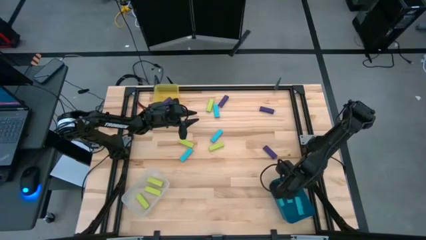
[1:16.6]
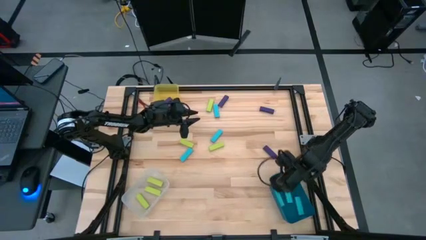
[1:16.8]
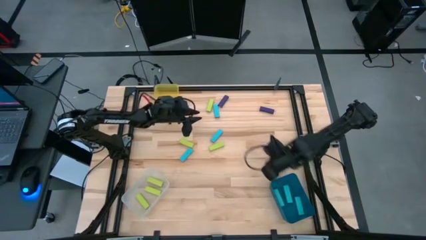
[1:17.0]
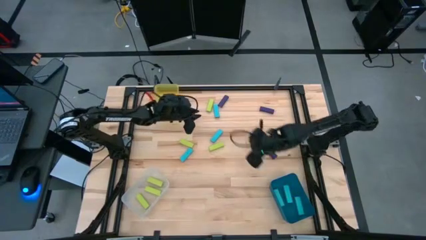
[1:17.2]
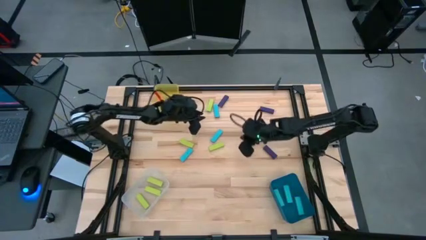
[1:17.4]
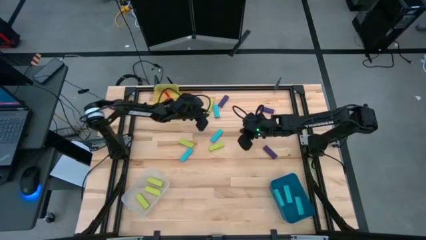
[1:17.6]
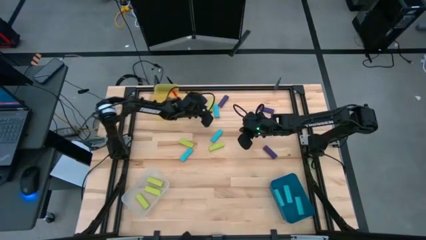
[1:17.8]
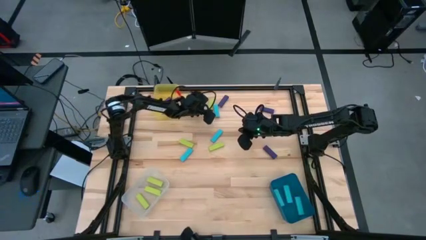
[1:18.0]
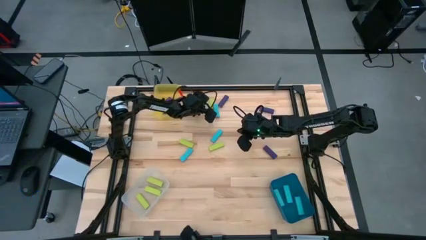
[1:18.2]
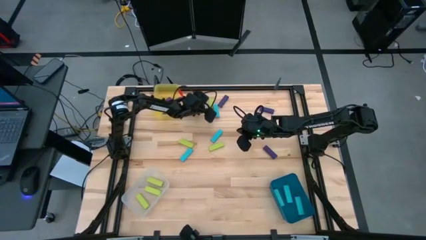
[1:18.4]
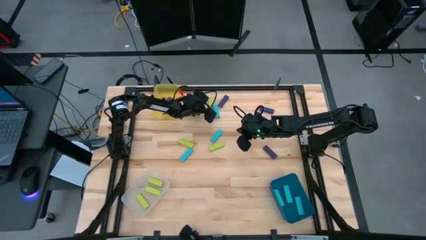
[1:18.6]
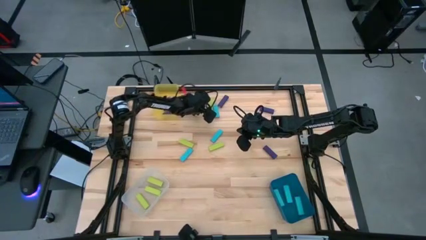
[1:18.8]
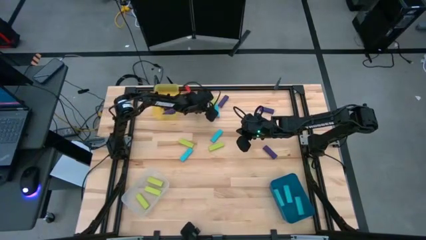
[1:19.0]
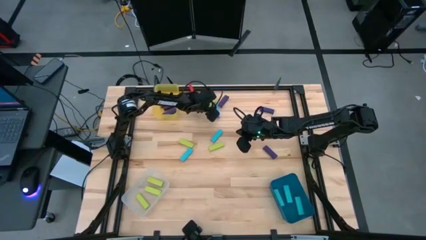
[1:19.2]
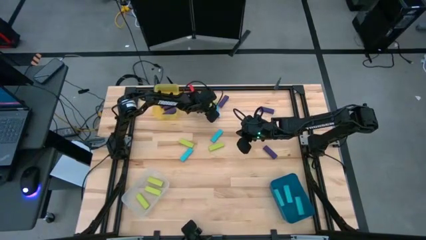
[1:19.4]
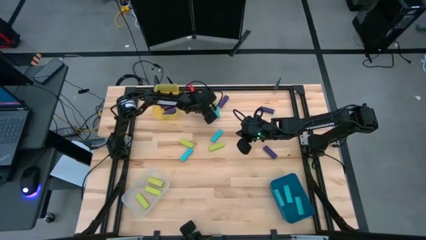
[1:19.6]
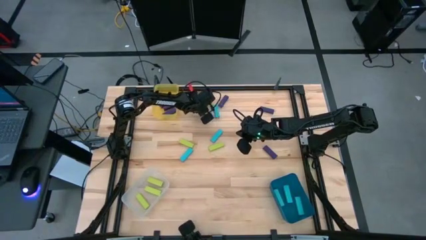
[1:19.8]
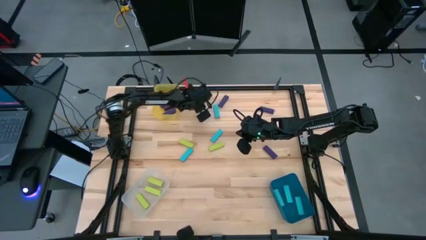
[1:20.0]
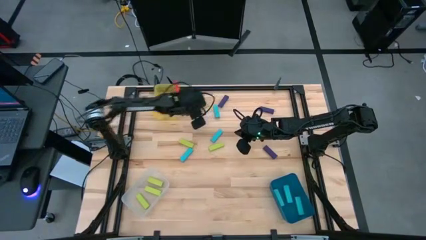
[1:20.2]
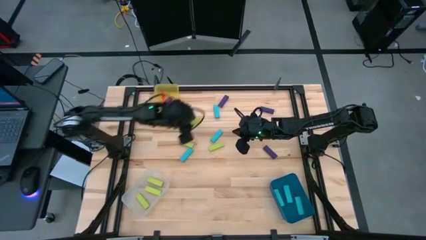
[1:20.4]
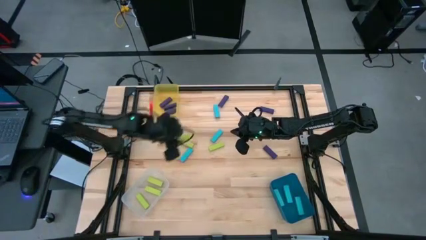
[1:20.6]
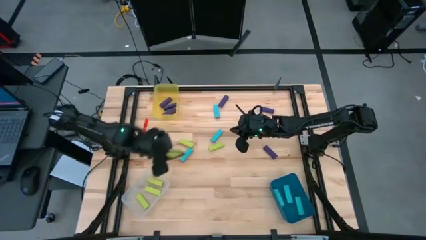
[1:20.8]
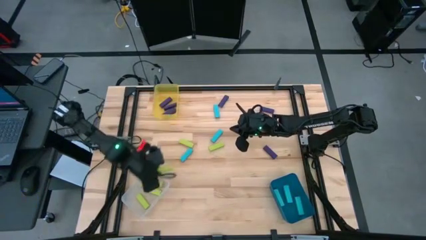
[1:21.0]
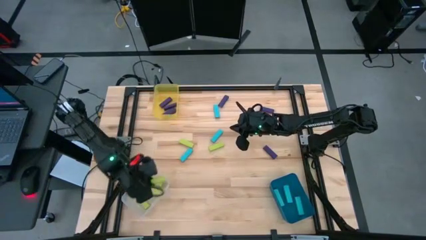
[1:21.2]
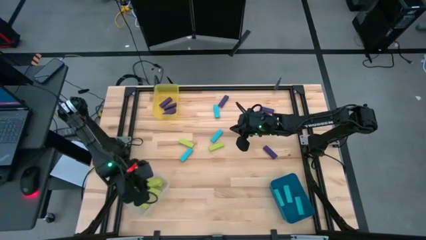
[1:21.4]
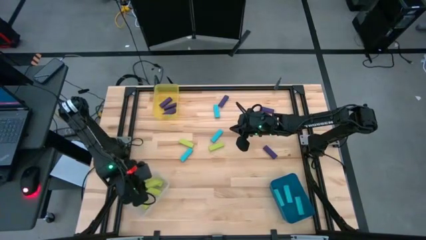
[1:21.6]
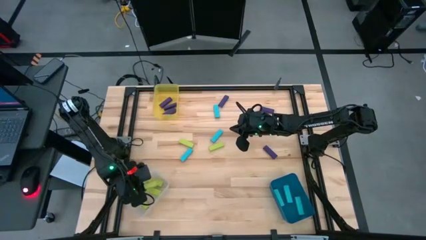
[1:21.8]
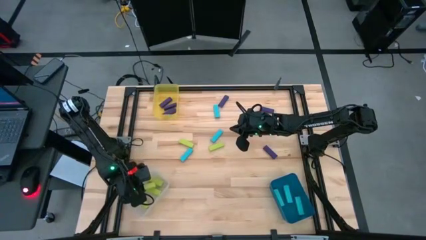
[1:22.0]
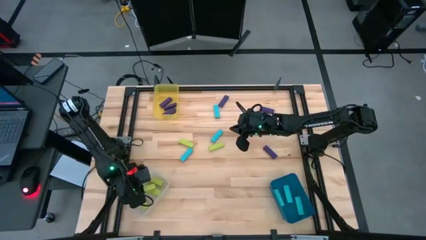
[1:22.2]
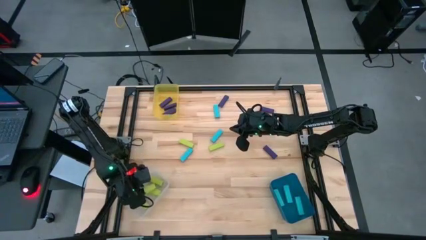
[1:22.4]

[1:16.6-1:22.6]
Task: Sort blocks
Put the green block into the transparent bin

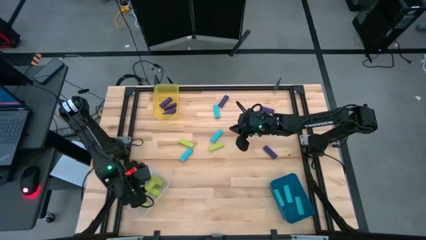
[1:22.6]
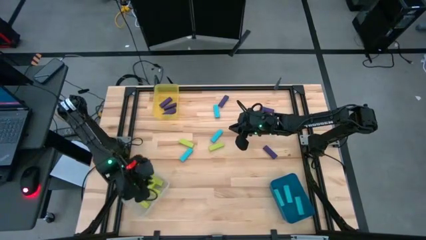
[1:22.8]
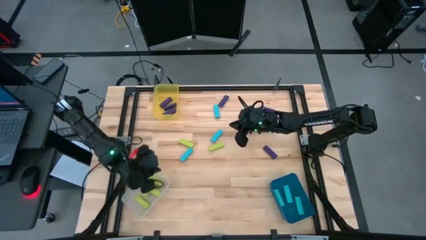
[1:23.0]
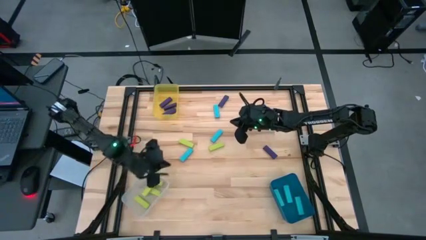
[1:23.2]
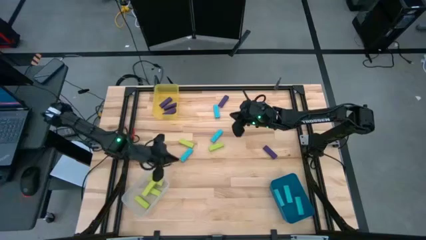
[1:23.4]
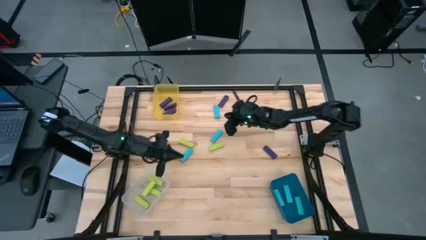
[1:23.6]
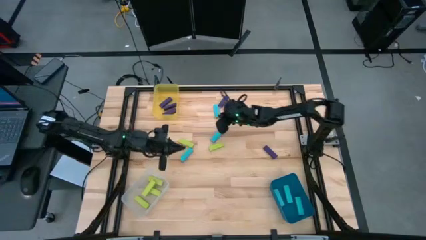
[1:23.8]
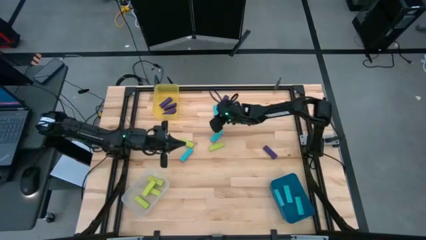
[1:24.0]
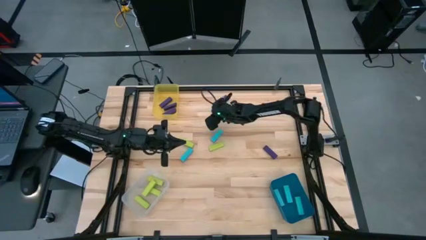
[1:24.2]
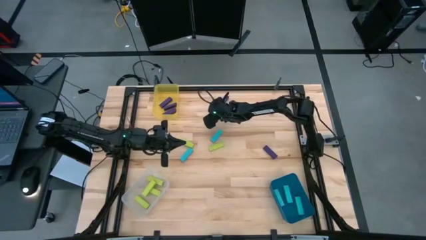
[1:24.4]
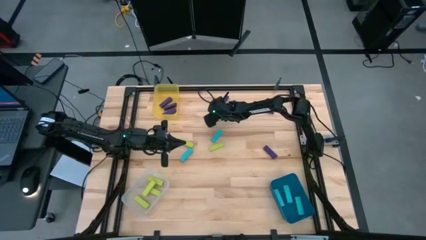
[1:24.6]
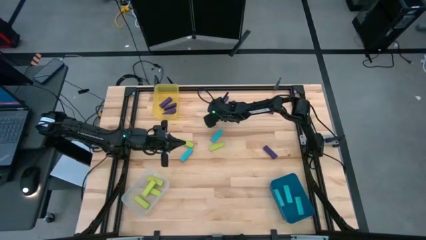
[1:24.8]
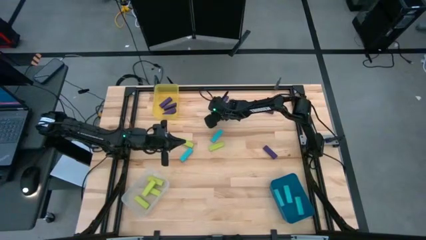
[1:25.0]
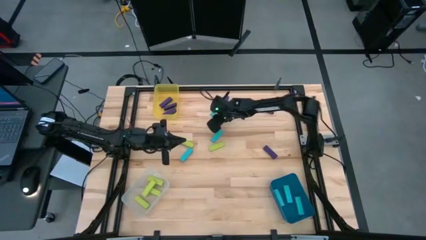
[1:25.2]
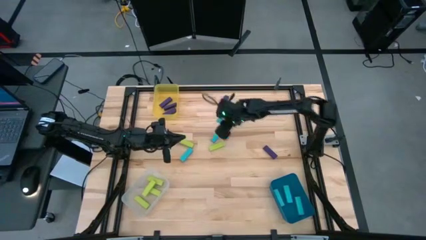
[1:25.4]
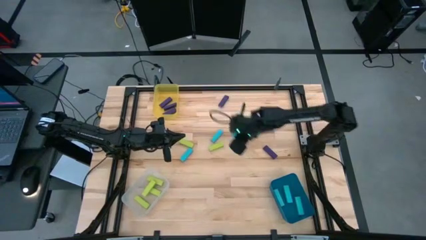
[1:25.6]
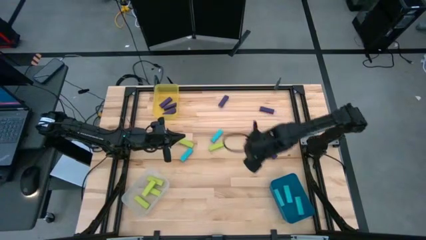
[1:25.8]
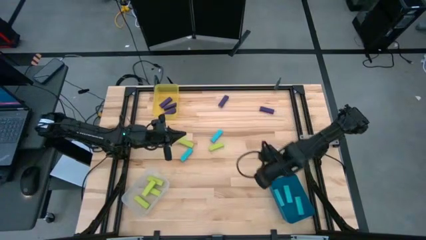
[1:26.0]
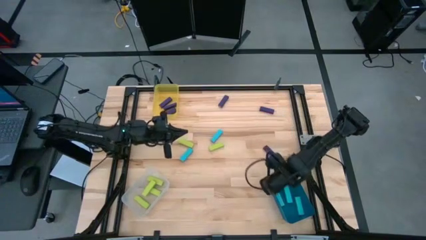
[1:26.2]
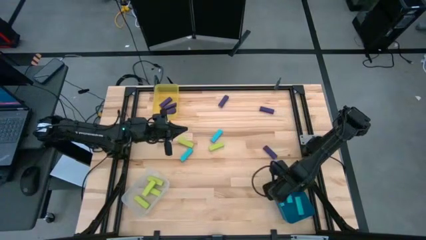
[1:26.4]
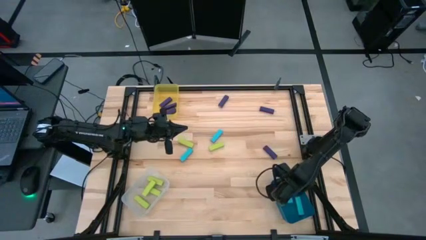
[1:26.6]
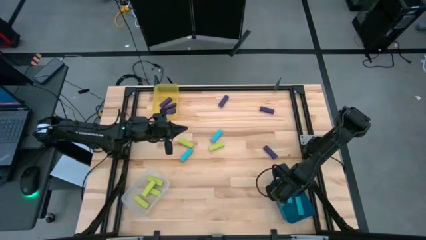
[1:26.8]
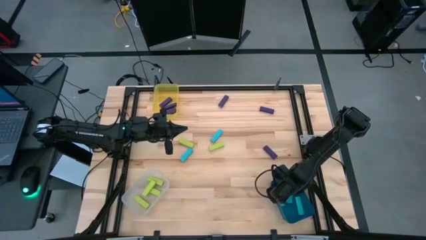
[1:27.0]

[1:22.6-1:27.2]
Put the blue block into the blue bin

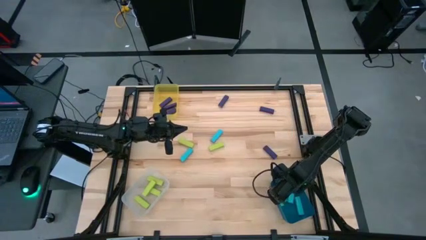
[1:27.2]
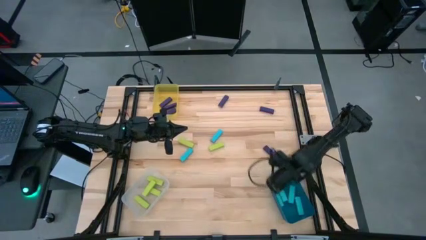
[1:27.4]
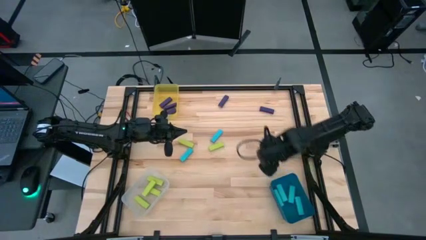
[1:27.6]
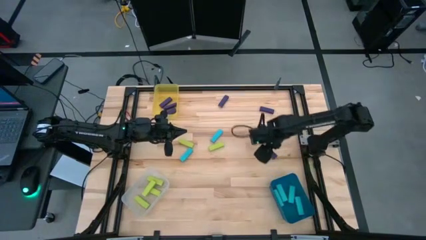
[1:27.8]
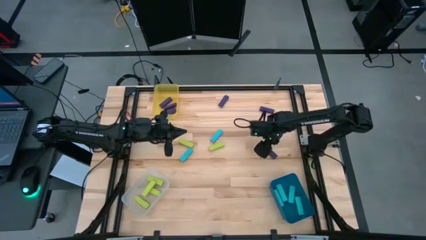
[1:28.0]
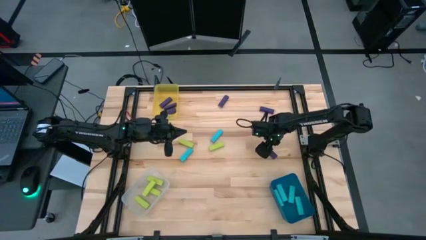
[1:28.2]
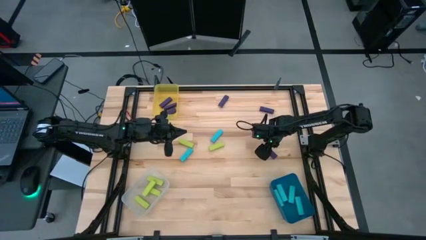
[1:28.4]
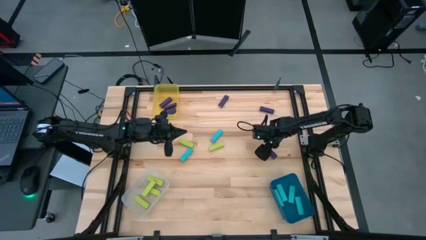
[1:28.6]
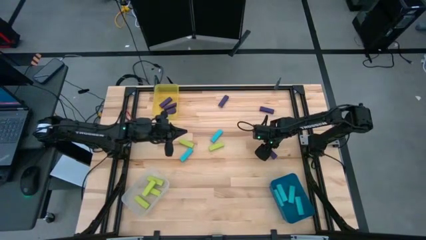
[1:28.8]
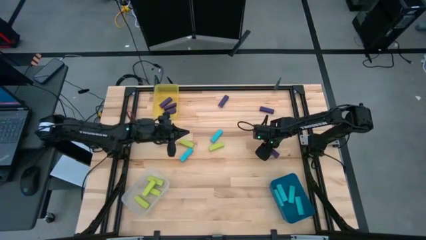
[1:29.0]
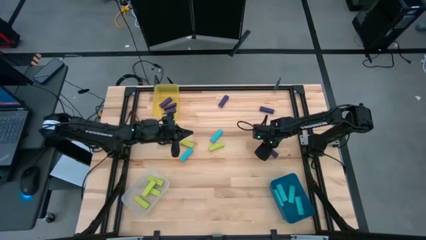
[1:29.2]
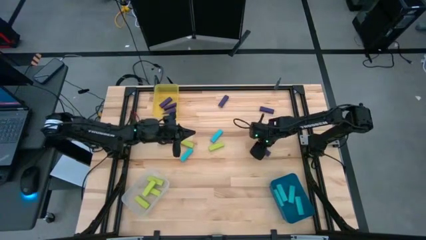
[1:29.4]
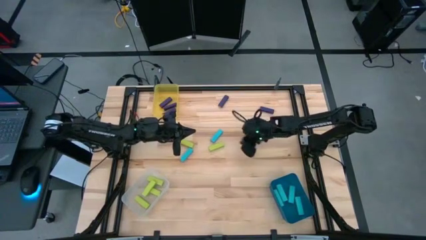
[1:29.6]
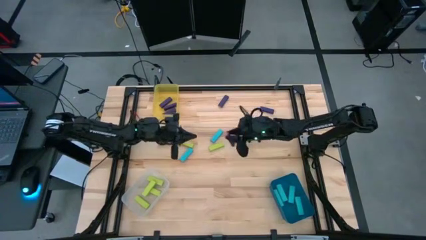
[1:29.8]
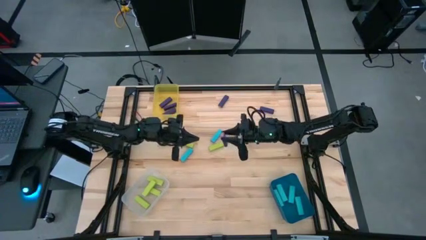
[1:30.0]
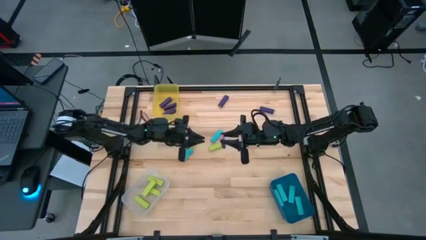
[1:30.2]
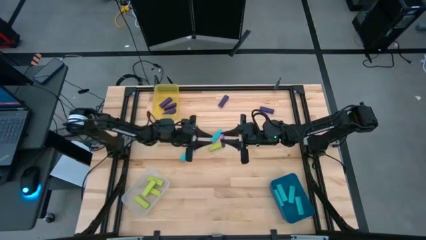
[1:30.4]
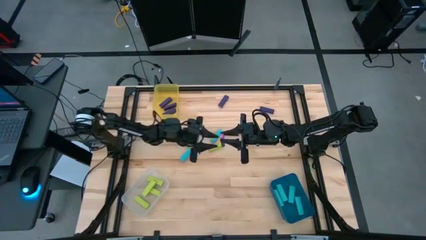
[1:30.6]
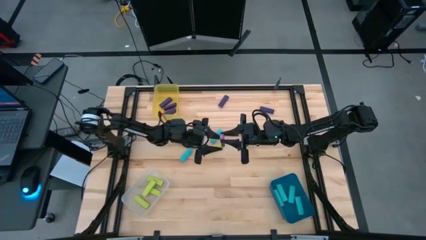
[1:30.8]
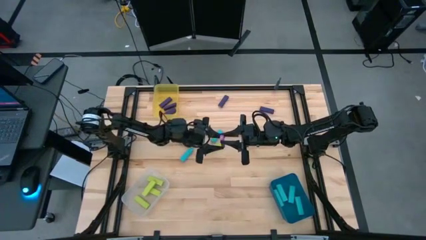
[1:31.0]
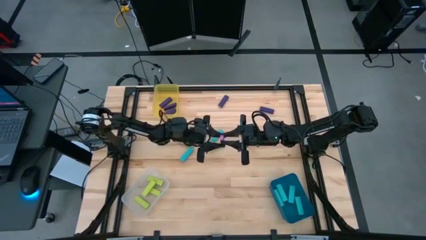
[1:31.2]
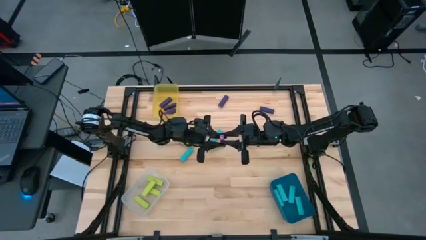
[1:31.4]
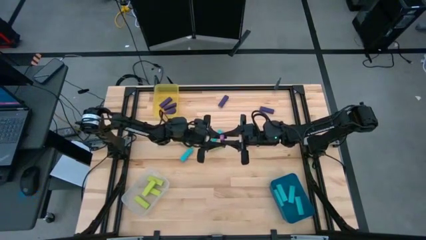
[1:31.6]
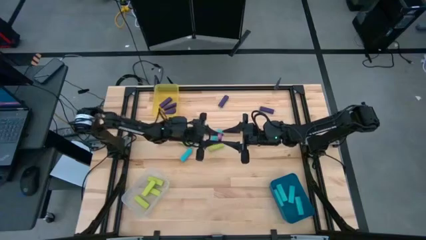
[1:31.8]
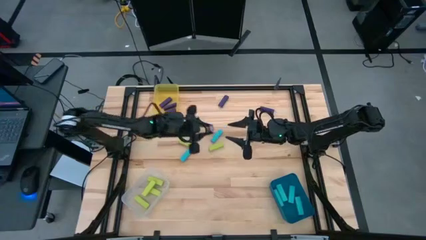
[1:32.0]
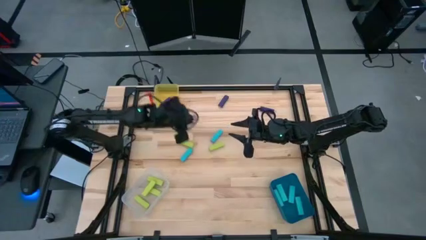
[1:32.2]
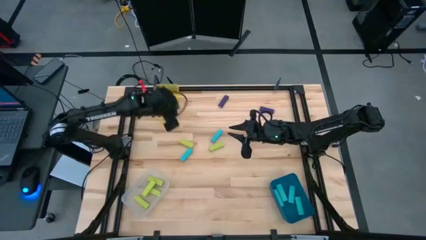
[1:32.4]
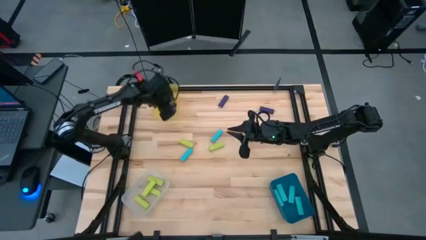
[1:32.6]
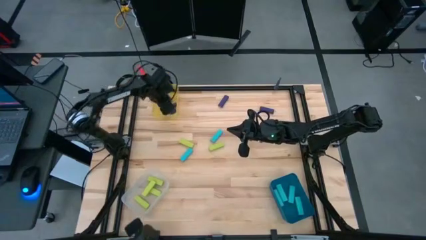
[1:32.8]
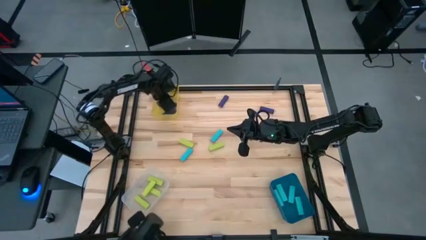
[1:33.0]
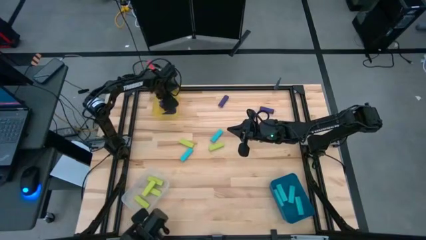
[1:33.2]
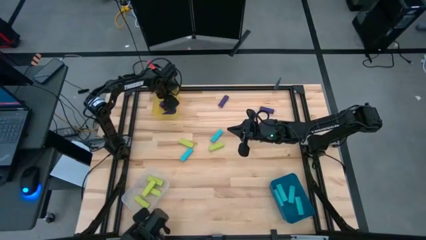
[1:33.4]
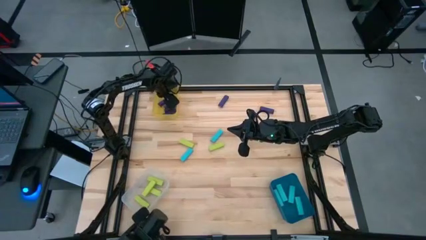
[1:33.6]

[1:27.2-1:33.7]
Put the violet block into the yellow bin
